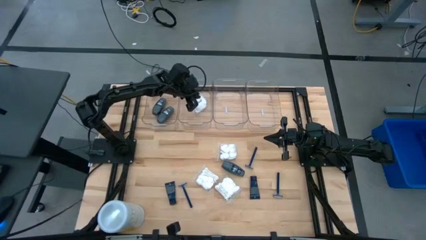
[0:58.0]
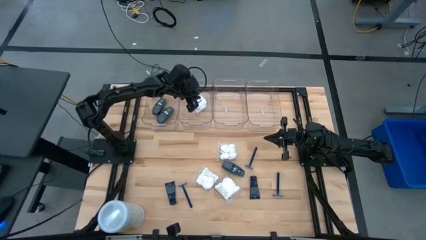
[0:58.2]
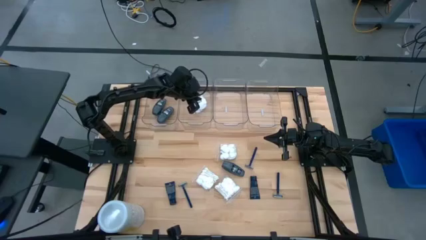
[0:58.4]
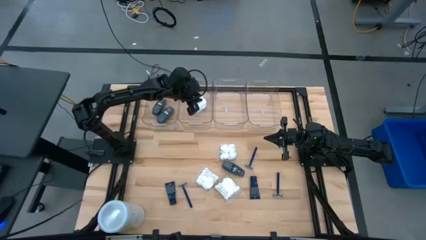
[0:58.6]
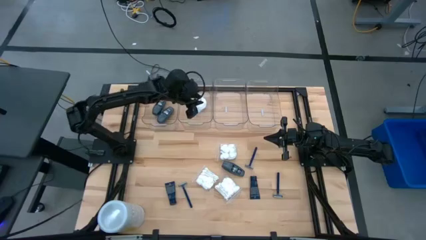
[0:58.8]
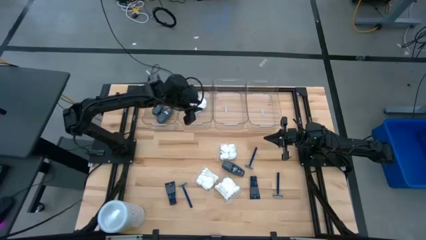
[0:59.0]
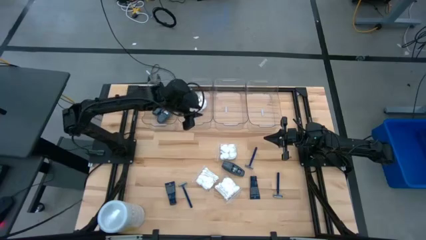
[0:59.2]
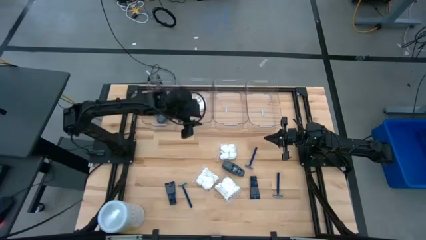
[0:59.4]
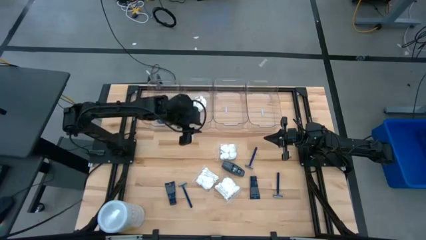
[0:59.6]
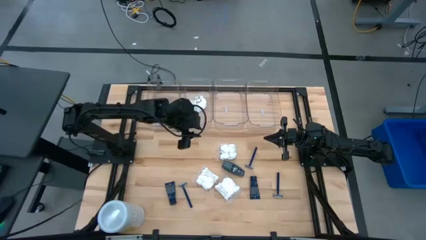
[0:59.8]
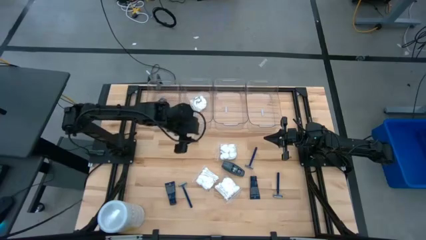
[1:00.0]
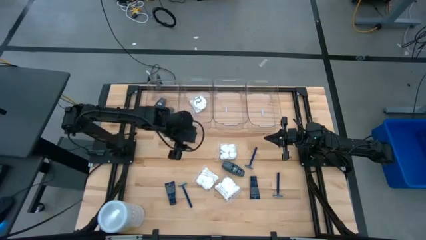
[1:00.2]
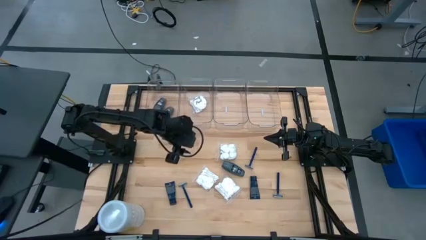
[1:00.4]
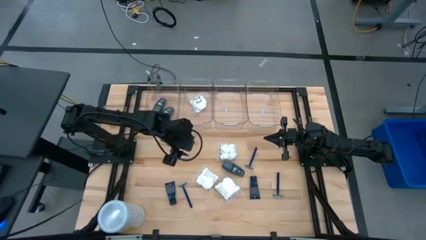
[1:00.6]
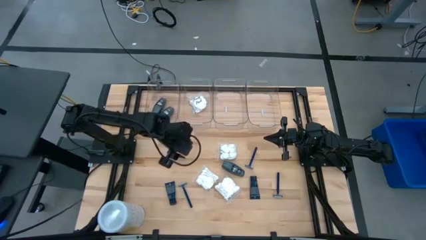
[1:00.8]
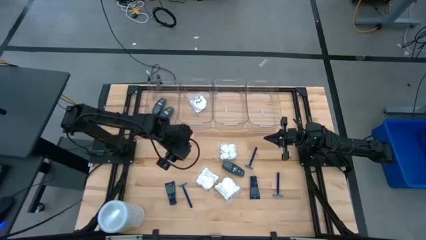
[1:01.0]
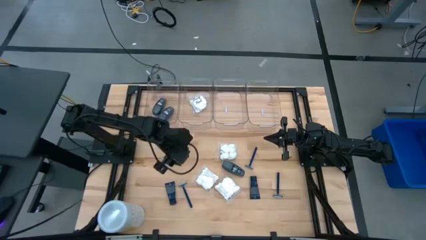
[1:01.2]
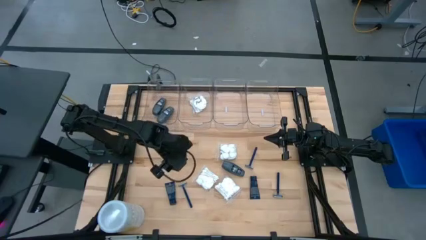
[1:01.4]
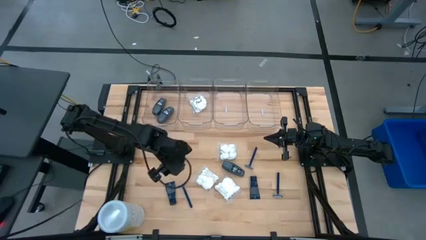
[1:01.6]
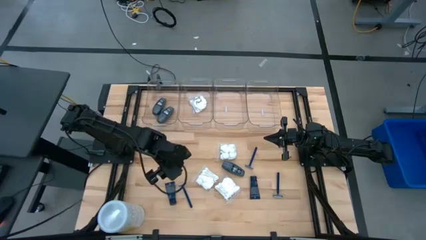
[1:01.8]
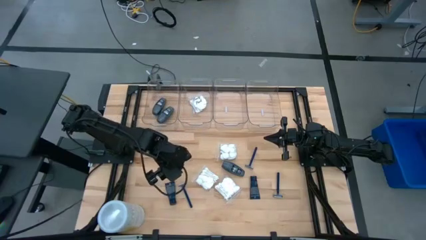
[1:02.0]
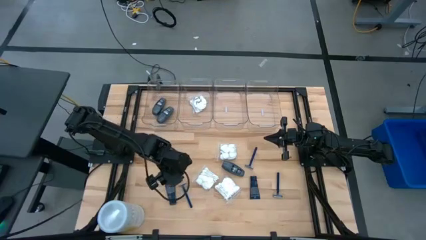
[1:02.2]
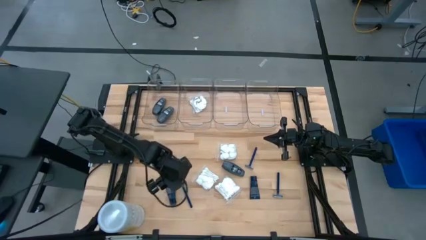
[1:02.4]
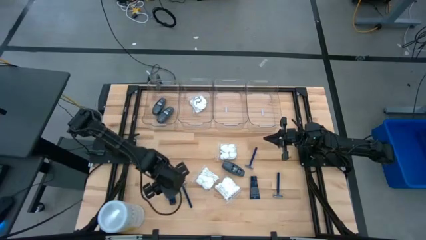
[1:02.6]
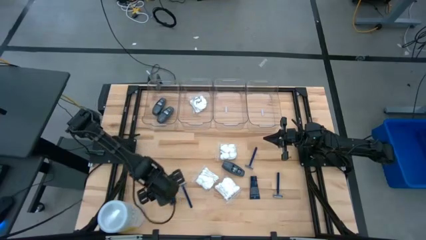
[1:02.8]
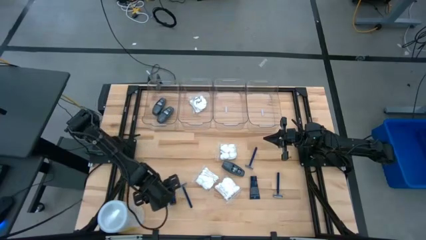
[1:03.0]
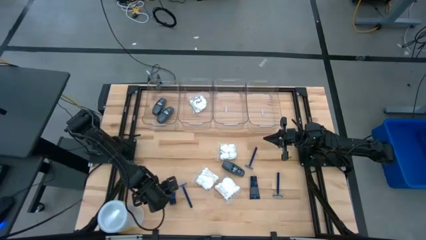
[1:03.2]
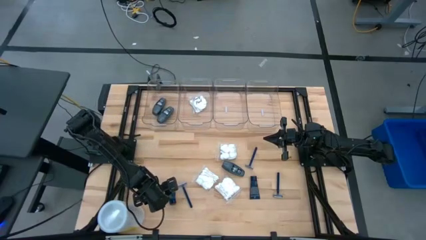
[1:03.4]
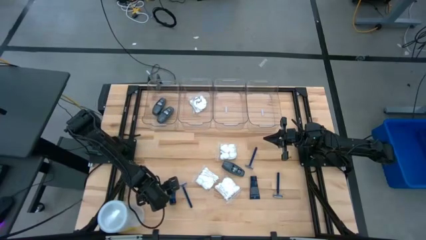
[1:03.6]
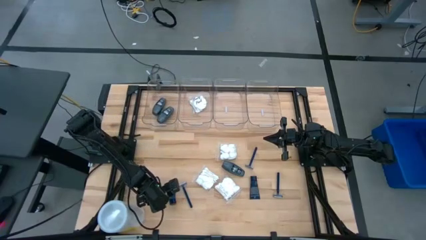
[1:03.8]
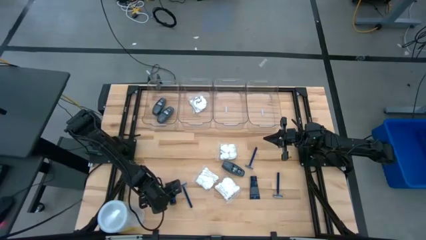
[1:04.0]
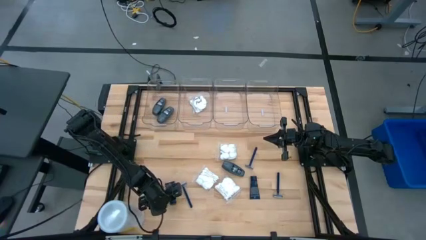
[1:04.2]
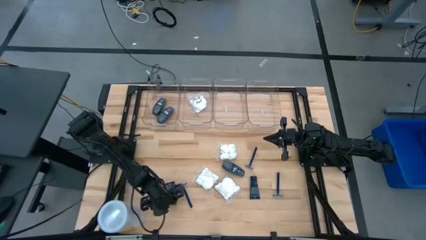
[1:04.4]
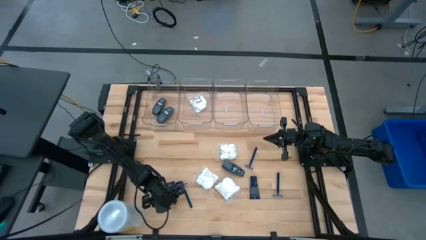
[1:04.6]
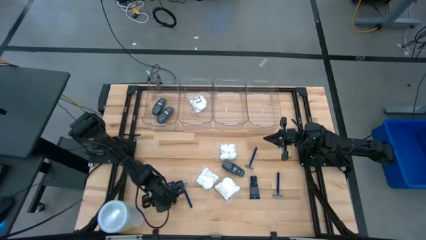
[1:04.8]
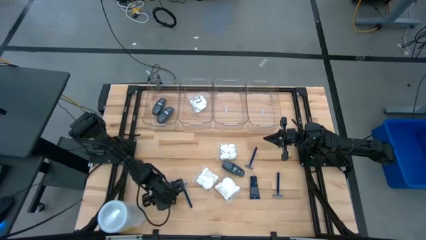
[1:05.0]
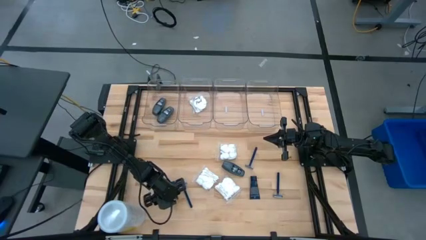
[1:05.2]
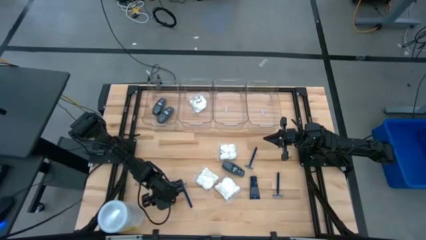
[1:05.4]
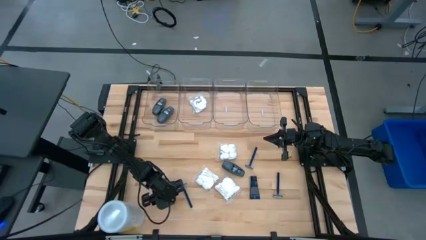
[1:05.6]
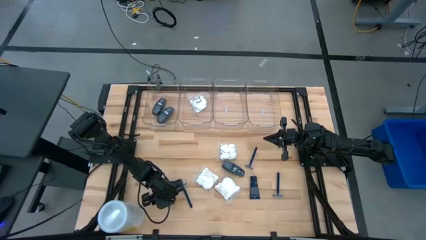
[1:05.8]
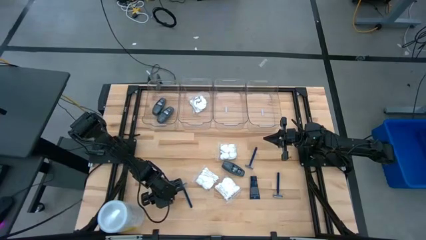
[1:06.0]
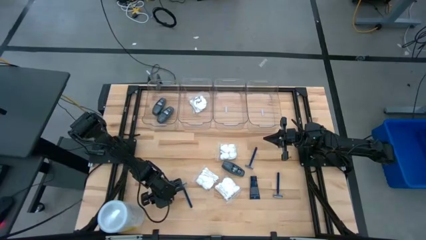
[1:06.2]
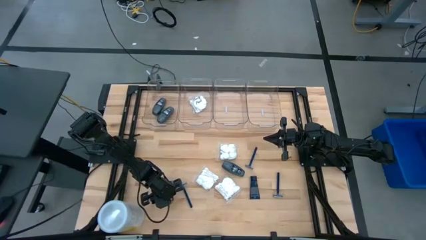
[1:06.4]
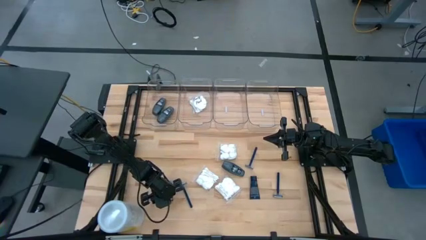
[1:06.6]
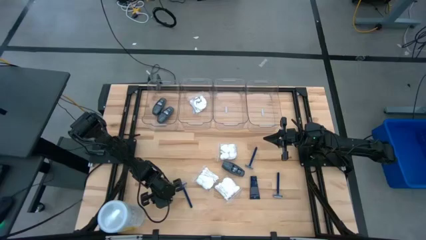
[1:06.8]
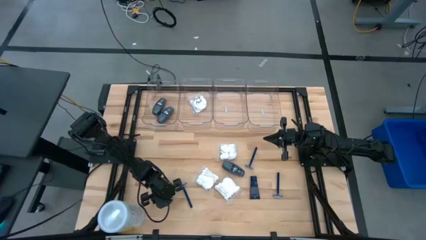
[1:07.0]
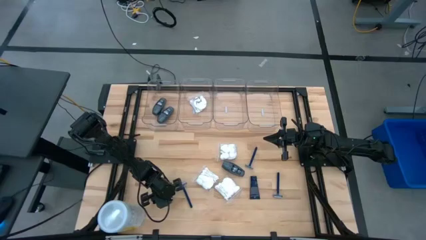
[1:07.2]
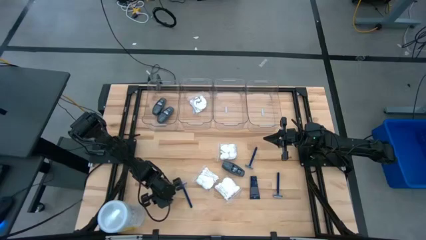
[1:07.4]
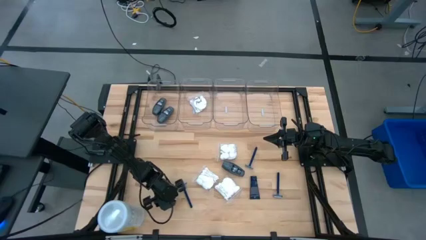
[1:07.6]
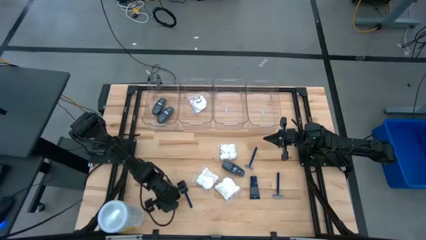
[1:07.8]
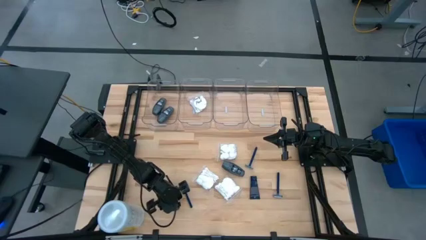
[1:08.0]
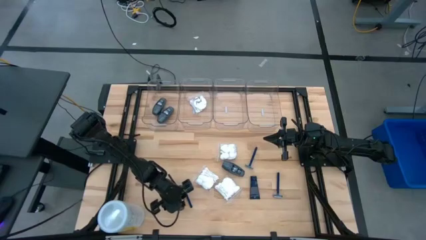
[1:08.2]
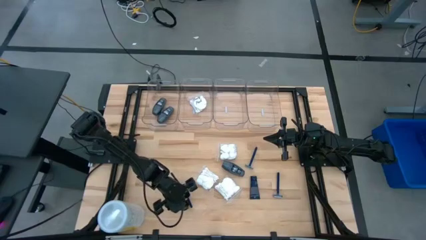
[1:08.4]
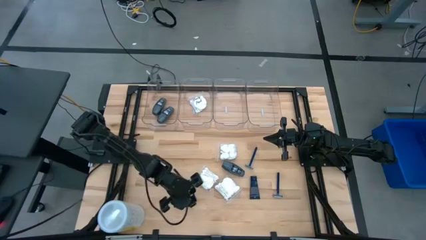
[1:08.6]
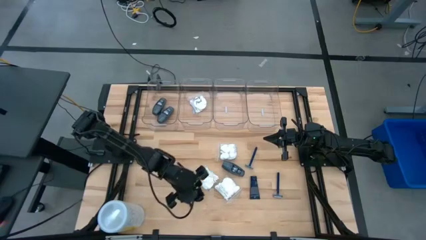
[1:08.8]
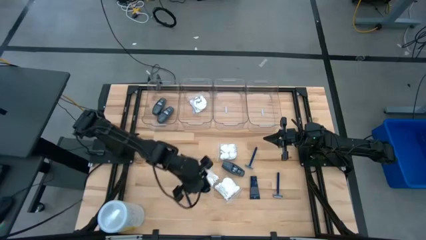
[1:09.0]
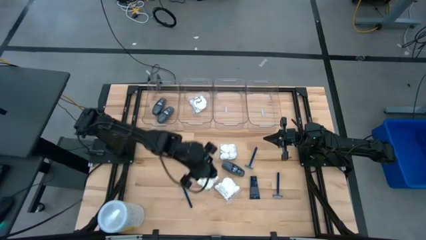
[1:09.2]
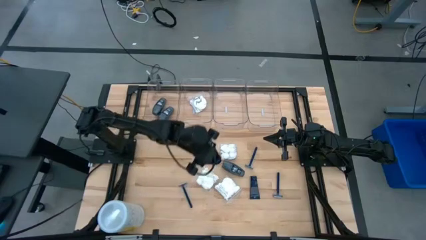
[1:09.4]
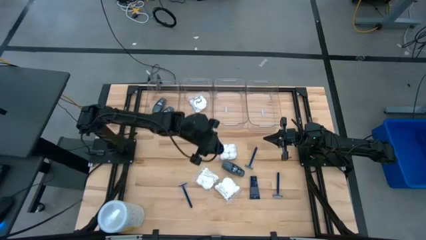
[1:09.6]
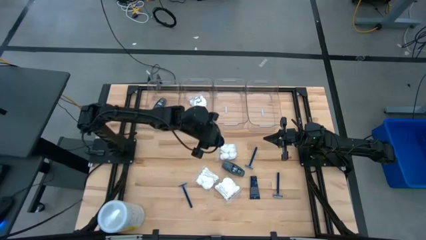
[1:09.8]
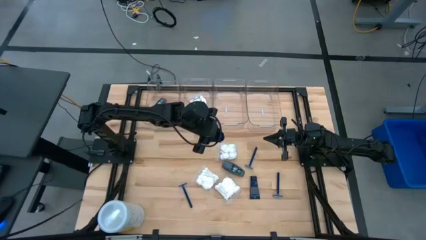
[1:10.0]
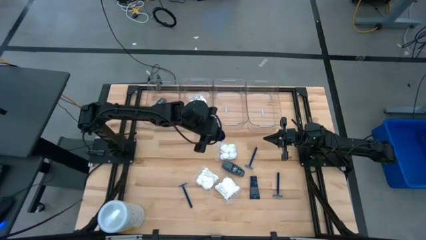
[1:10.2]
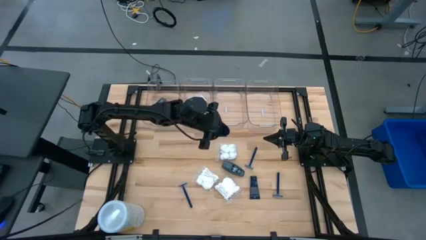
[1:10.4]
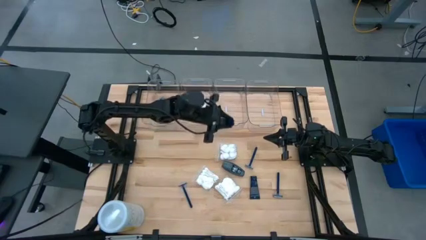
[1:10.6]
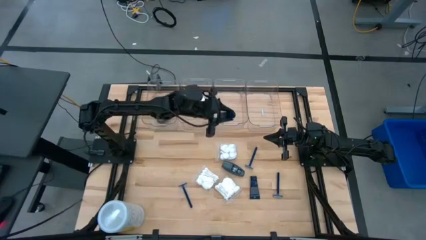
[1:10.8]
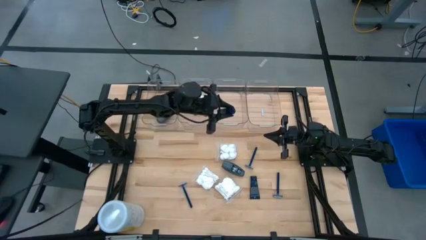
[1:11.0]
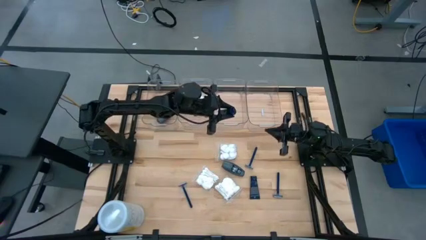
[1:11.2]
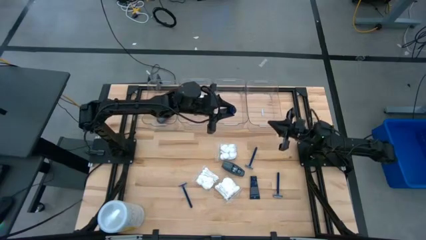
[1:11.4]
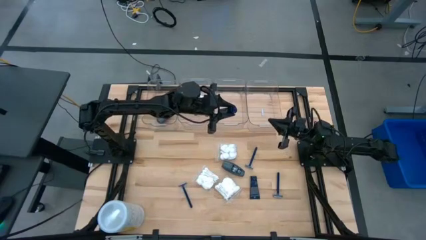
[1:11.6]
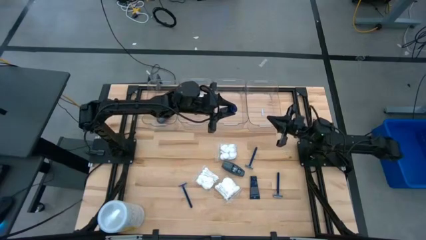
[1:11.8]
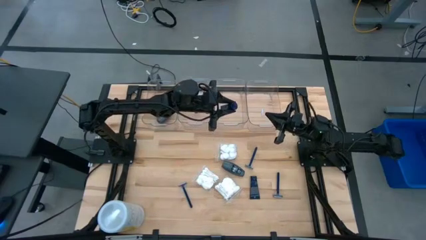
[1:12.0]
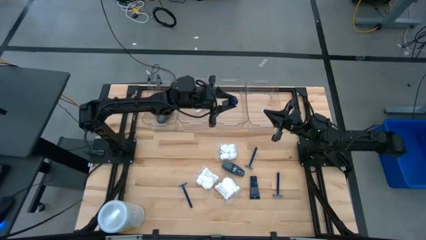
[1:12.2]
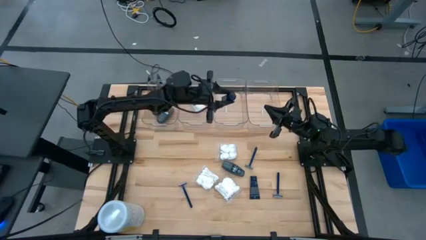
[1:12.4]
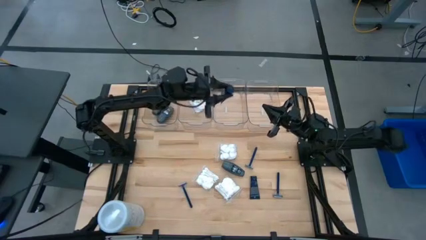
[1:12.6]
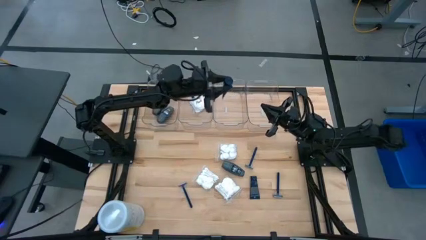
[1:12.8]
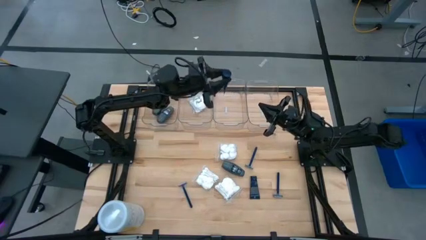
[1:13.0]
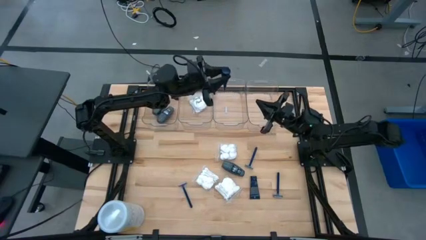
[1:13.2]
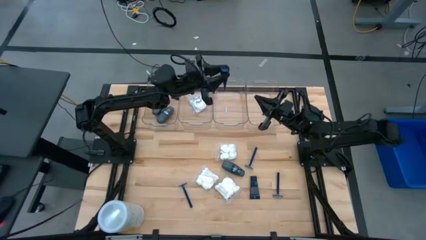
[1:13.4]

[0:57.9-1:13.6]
Task: Pick & Place Travel size toiletries
Put the left blue shave cream into the middle right transparent bin

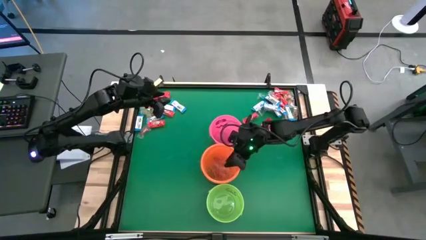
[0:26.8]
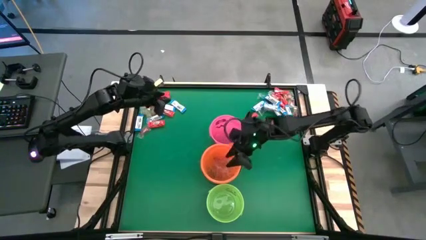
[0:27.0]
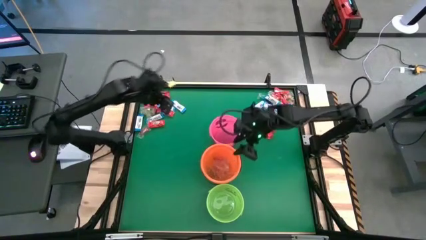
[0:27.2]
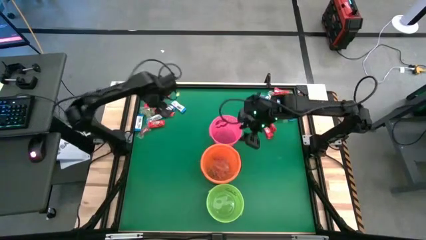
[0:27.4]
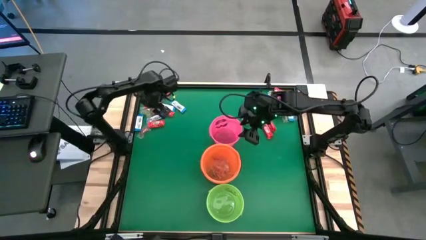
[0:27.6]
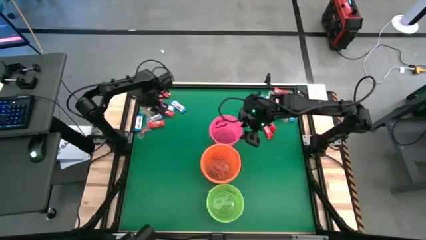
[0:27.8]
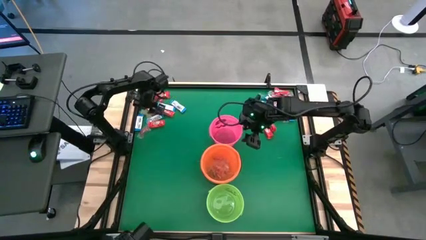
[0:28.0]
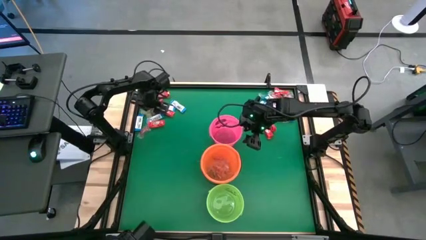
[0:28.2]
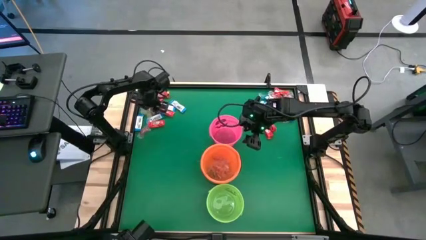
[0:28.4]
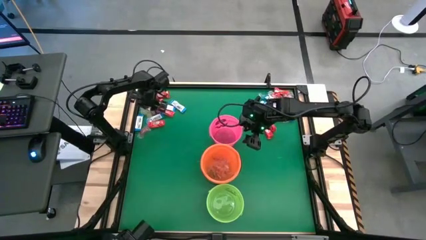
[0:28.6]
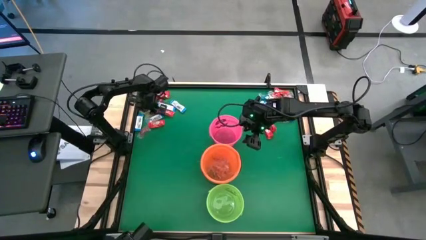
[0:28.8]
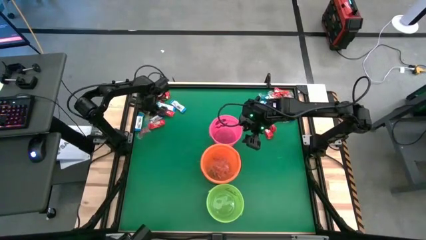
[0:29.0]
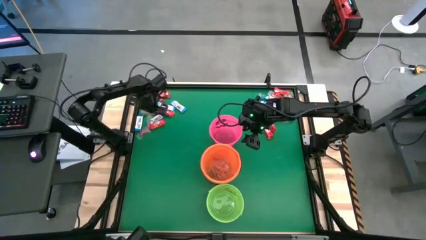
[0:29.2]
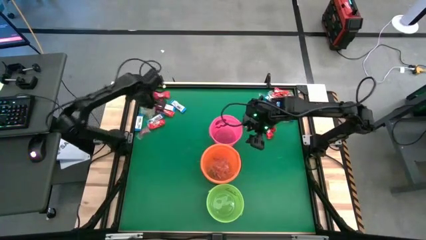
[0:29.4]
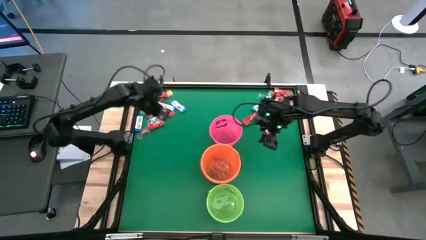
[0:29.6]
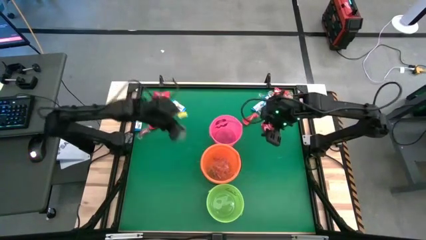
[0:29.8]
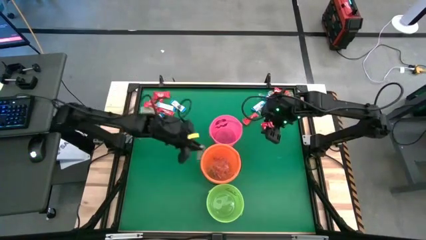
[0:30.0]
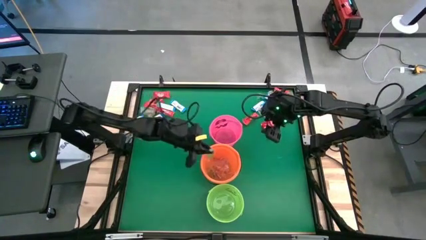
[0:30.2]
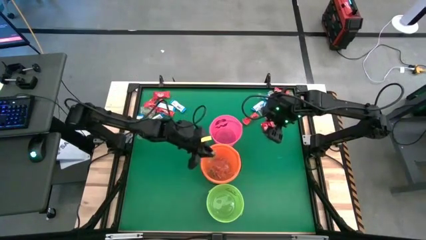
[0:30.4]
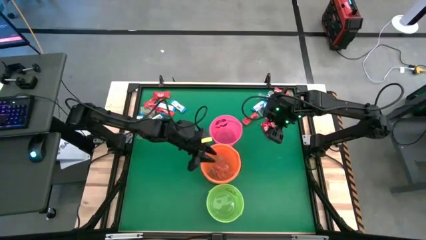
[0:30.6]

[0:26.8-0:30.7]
Task: Sort candy by brand, put in halloween buckets
Put the green gummy into the orange bucket
